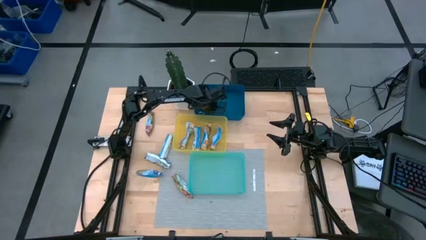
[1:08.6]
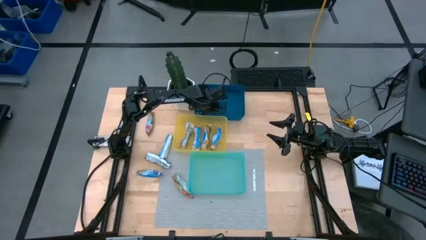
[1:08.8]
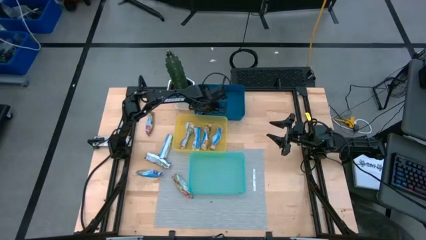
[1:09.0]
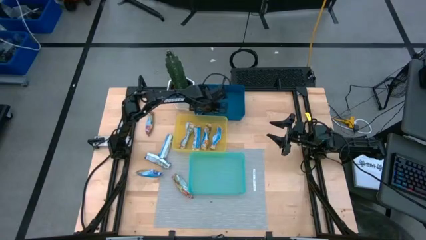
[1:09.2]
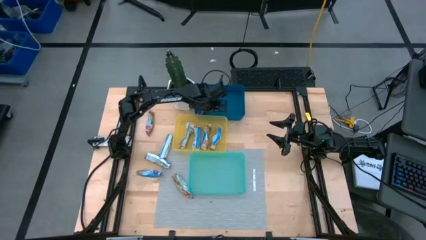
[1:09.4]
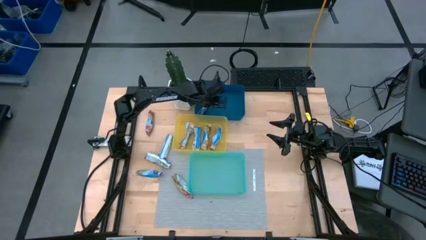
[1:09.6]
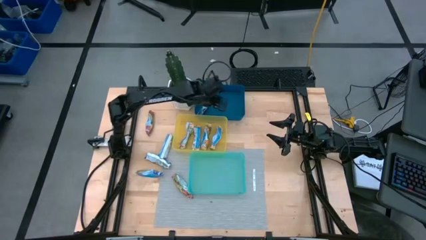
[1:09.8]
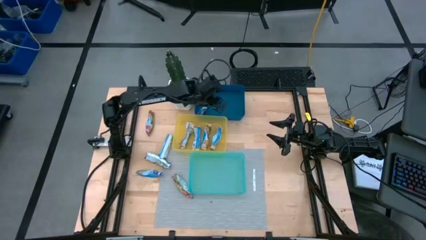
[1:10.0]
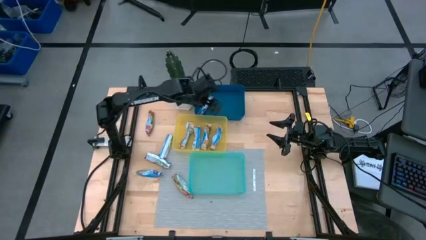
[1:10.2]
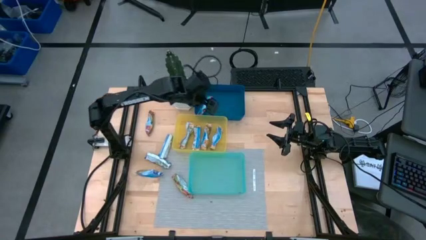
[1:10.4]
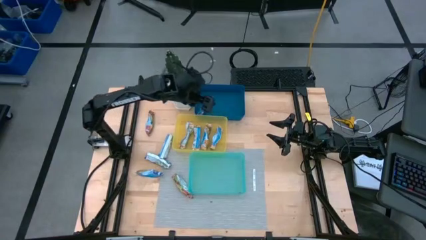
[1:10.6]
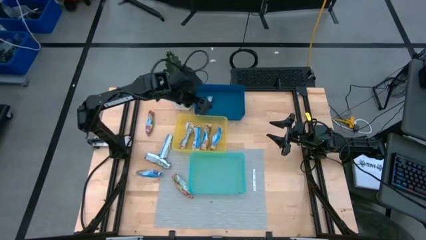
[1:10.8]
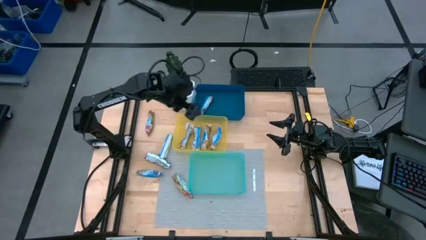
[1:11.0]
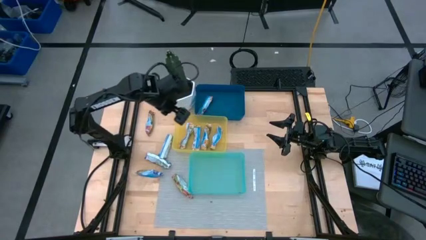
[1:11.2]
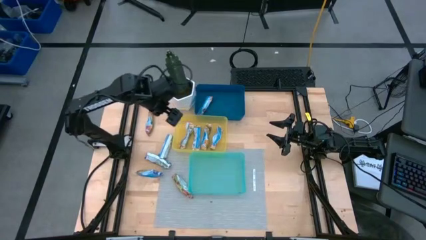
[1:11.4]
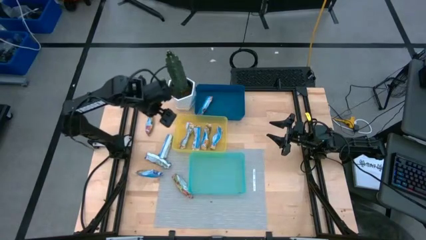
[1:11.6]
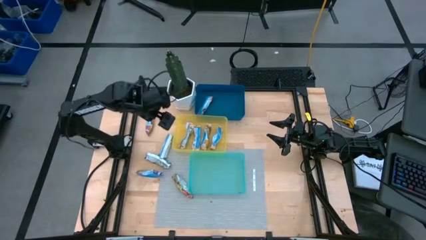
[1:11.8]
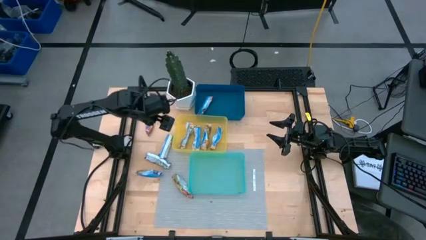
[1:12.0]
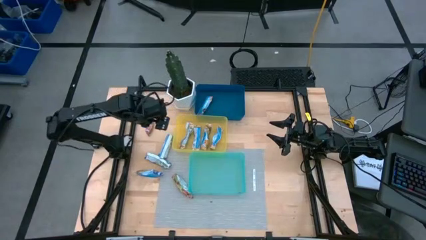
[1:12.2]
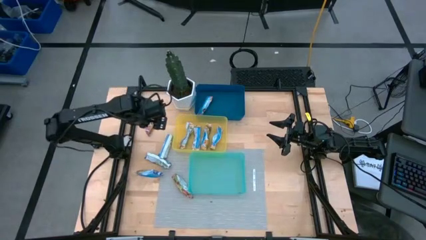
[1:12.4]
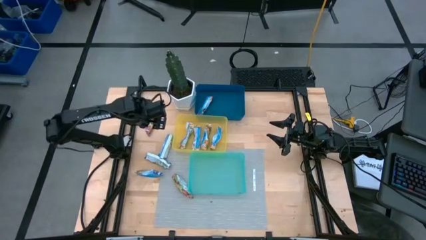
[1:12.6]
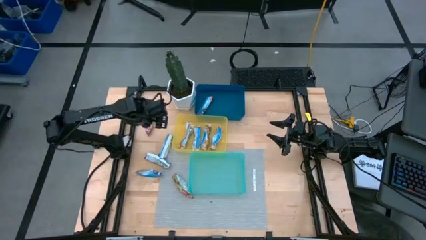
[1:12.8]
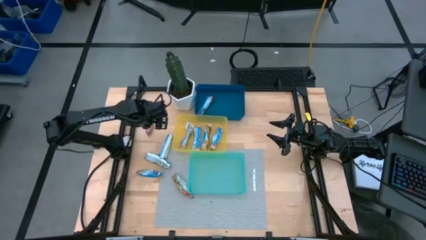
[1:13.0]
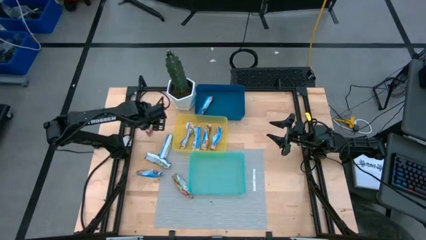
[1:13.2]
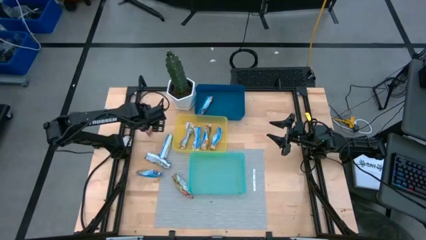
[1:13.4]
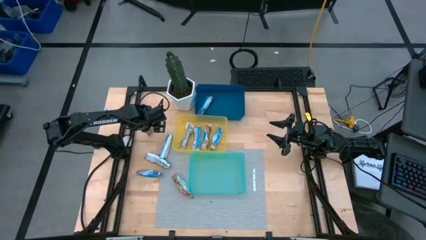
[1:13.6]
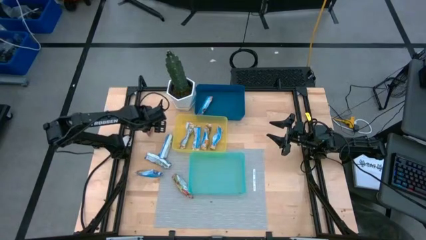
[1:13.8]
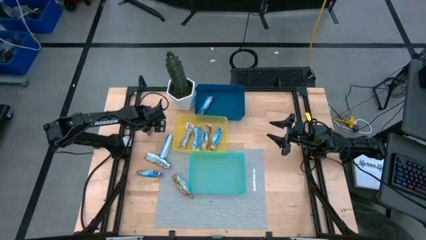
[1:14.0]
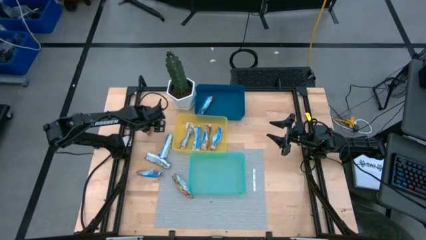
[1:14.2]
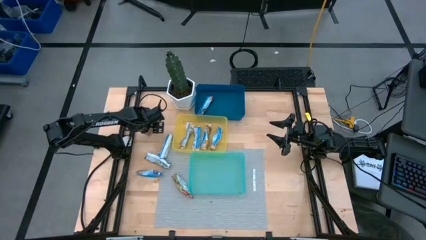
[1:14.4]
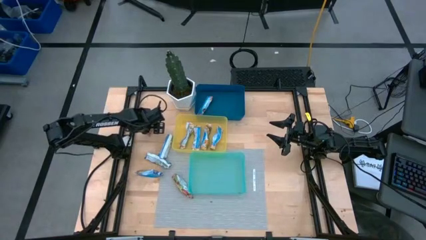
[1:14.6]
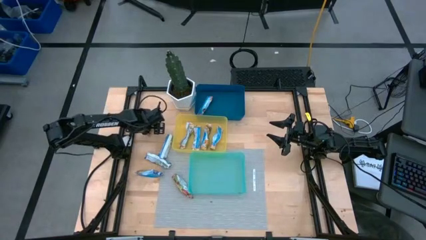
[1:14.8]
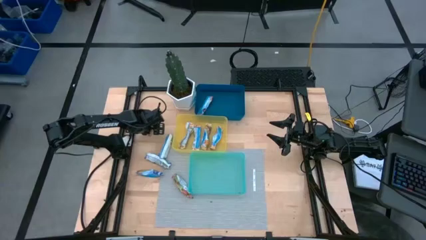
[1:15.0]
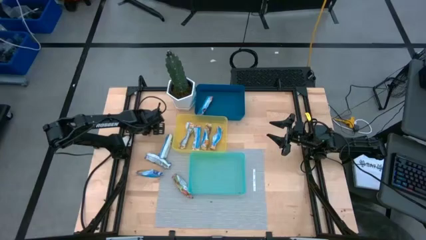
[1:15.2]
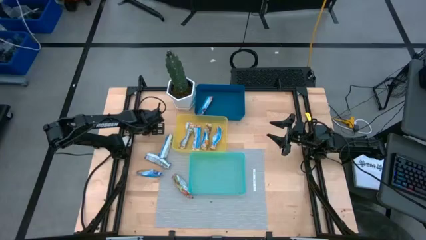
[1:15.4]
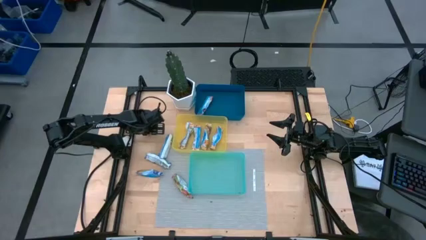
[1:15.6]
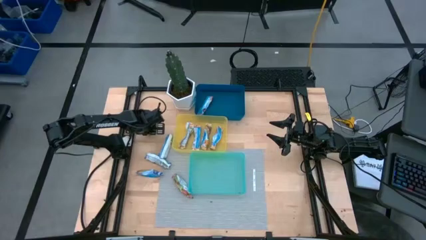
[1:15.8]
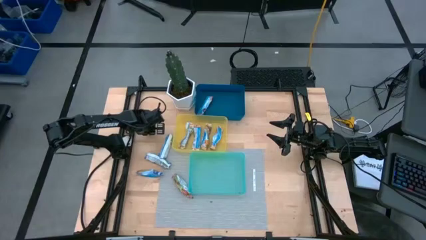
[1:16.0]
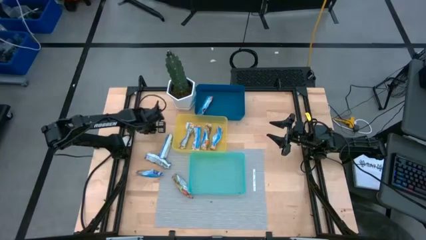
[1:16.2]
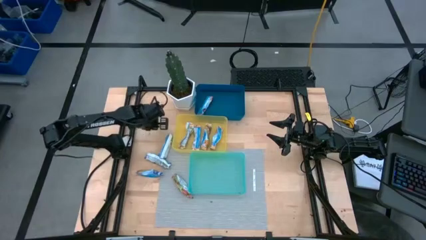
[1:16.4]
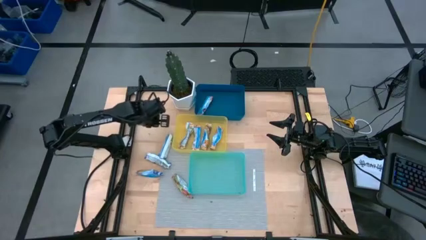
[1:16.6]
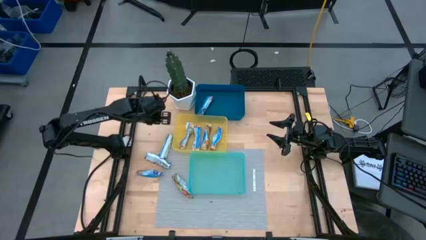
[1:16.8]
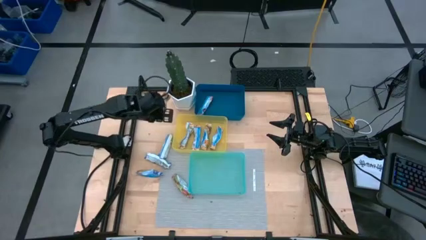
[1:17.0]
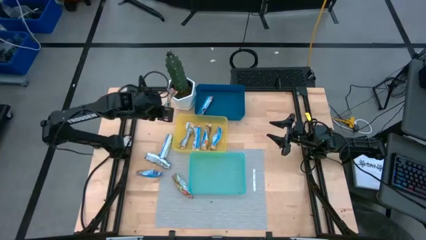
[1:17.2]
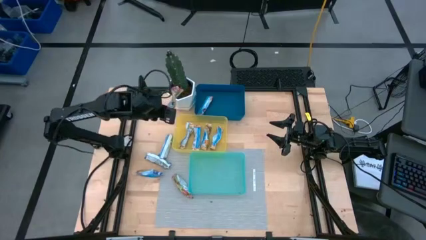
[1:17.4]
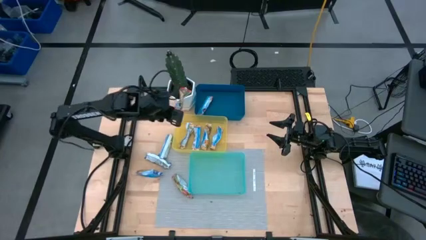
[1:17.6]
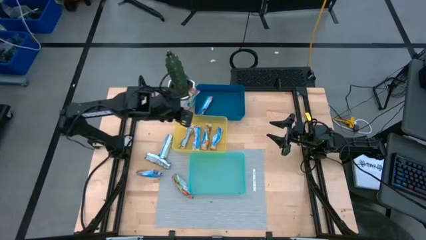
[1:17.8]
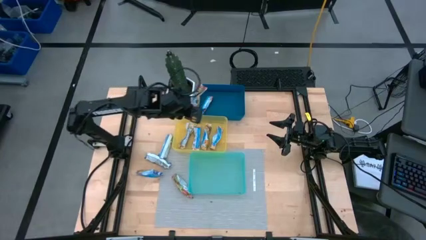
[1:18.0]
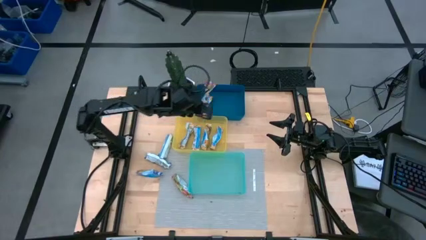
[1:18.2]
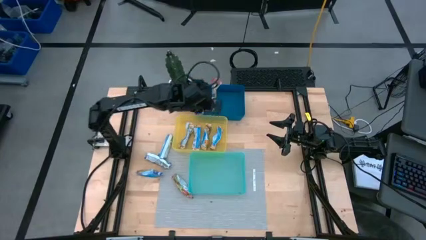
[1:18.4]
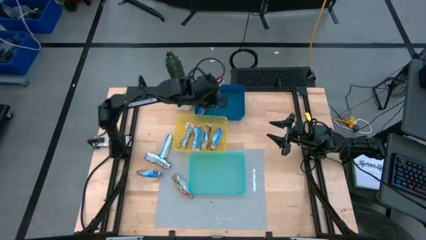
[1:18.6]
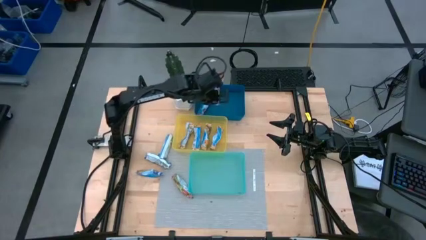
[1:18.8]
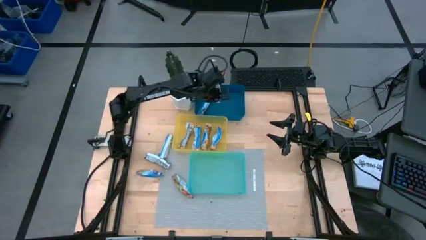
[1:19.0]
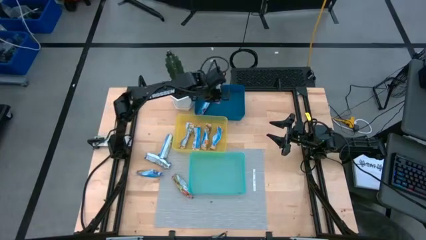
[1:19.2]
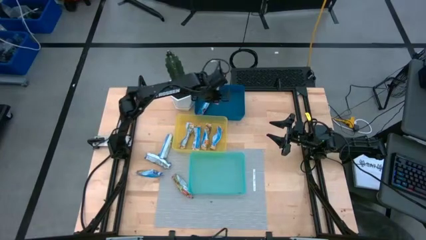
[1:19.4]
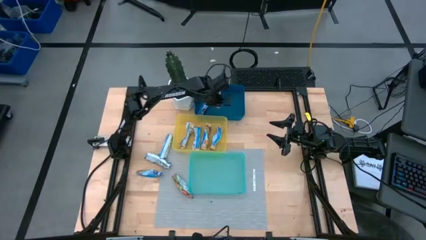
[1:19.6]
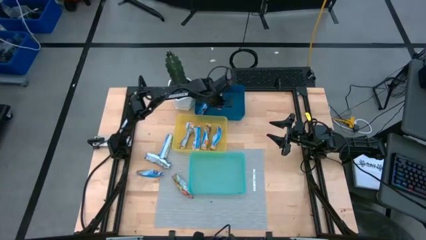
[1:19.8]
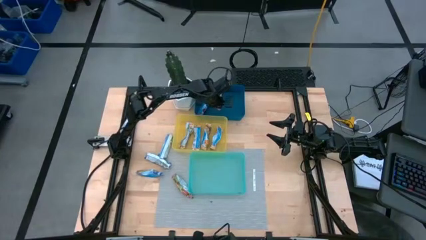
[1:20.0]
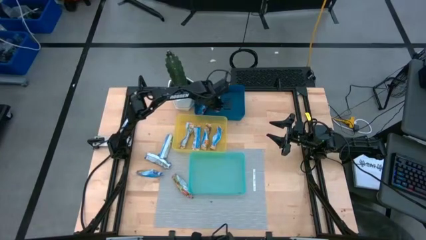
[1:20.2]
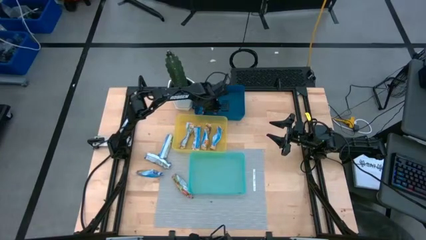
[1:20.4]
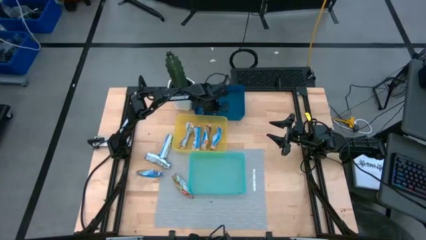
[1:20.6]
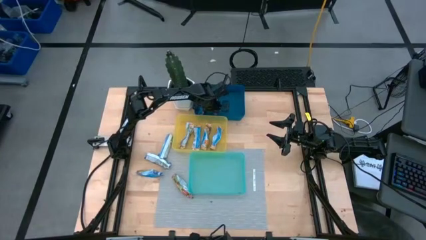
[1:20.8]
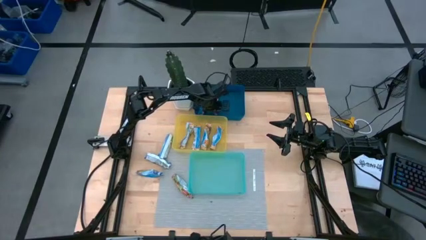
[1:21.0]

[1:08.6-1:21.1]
Task: Pick and place Granola Bars by type
Put the red granola bar into the blue bin

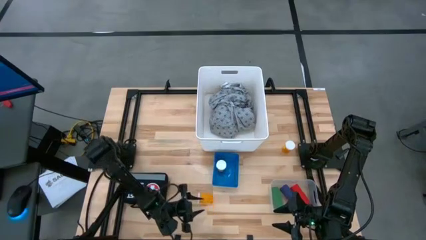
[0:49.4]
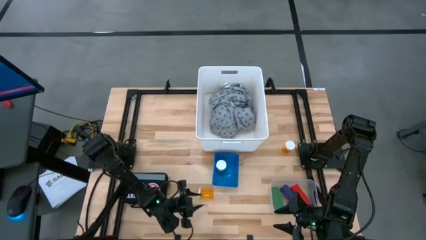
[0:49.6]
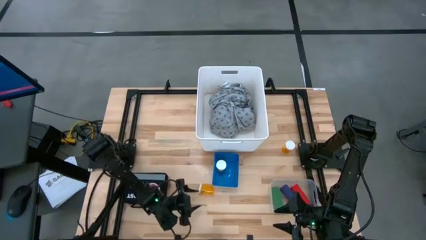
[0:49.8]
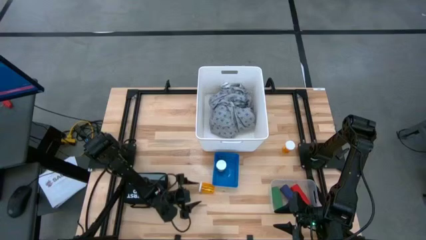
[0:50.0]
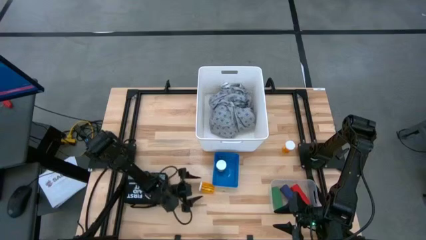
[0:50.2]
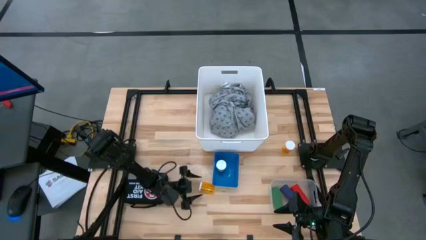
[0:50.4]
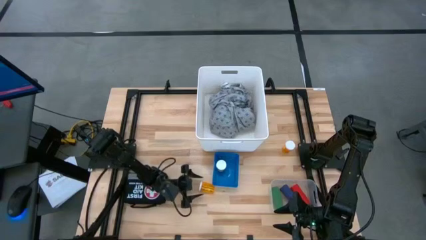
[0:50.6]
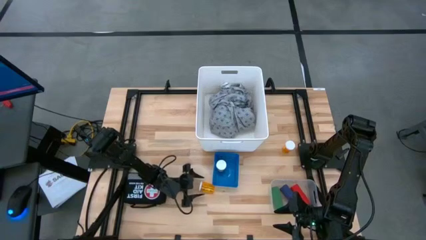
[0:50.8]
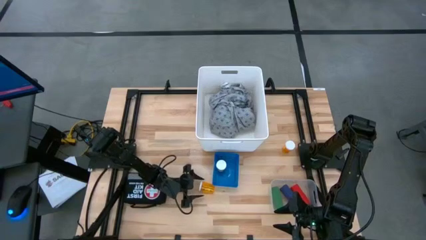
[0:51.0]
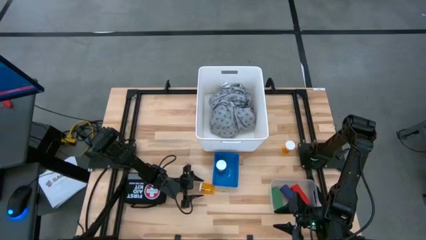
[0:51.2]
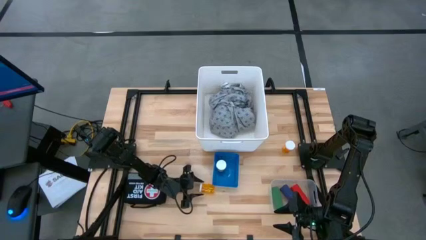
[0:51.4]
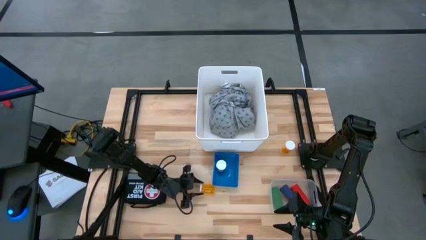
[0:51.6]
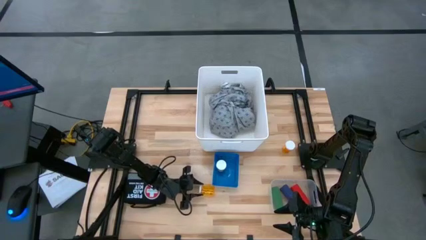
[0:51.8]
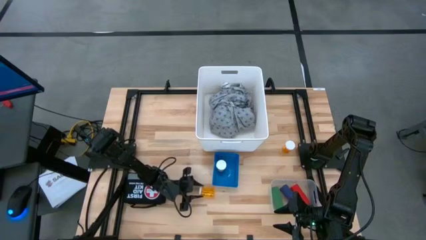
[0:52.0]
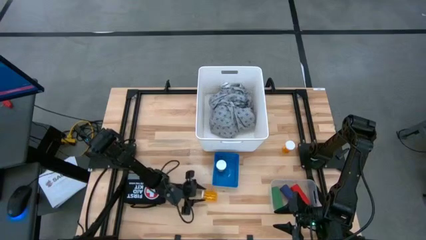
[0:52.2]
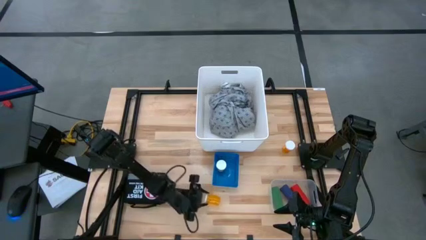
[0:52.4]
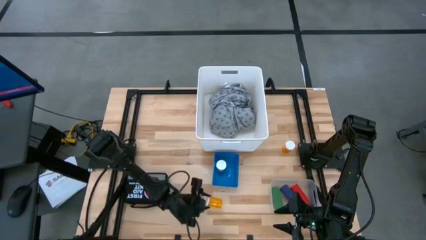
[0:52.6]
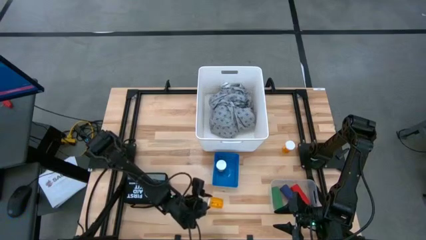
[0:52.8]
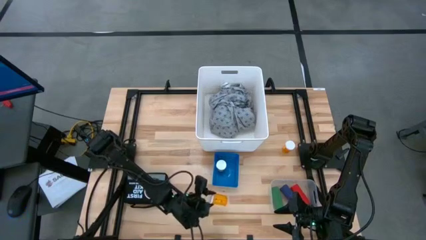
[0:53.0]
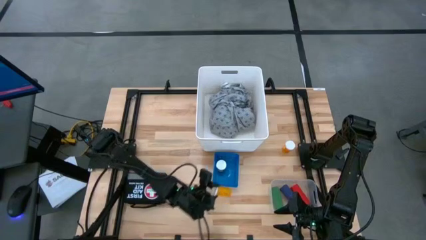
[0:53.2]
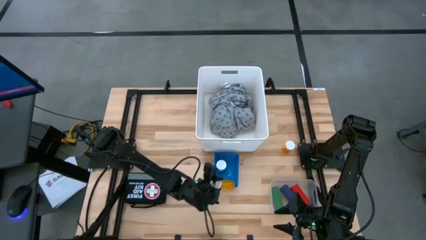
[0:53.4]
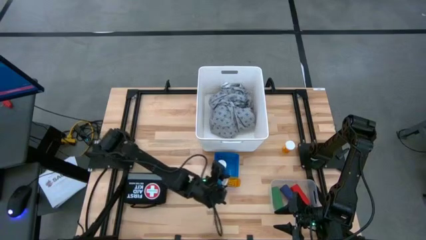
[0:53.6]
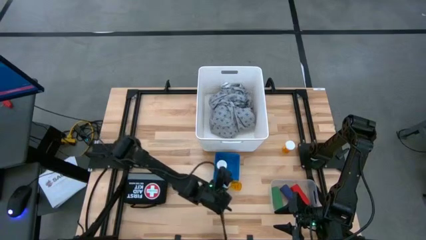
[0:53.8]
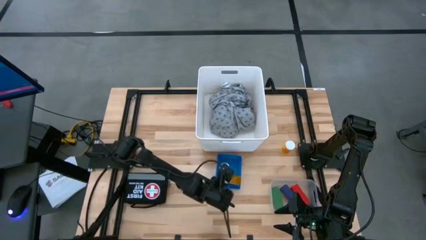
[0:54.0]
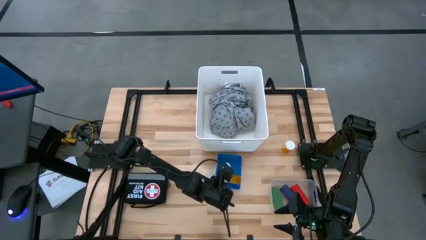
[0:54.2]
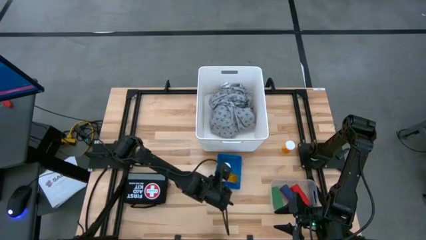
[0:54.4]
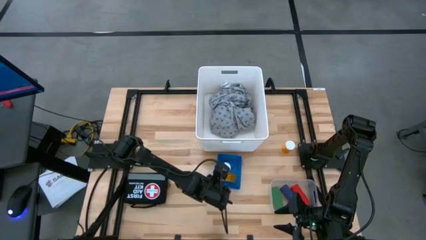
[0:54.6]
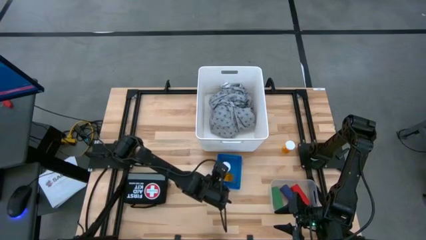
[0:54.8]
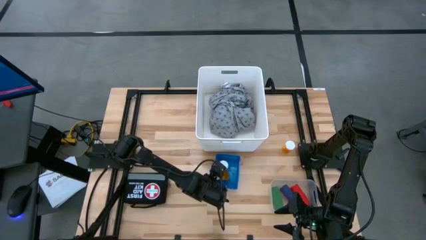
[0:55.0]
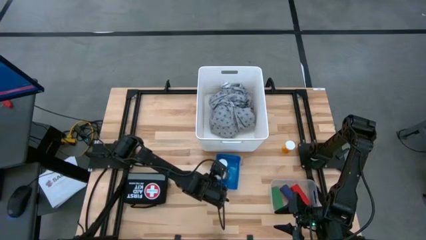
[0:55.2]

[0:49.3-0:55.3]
Task: Pick & place medical supplies in basket/bin
Put the bottom yellow pill bottle into the blue bin
